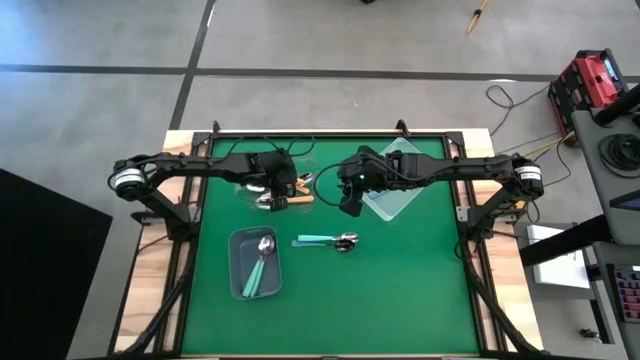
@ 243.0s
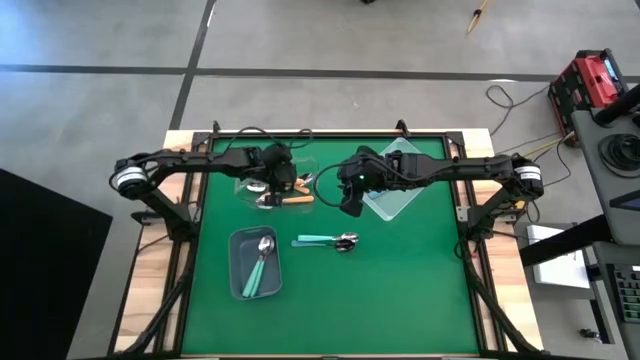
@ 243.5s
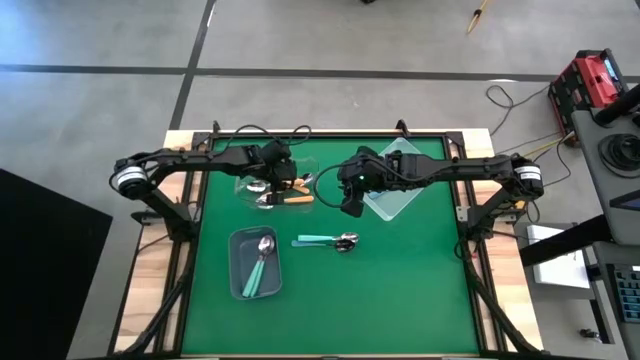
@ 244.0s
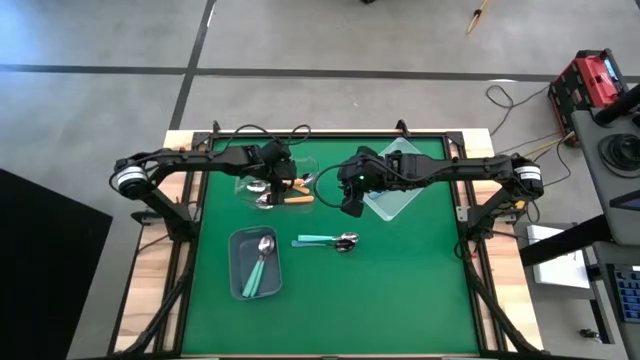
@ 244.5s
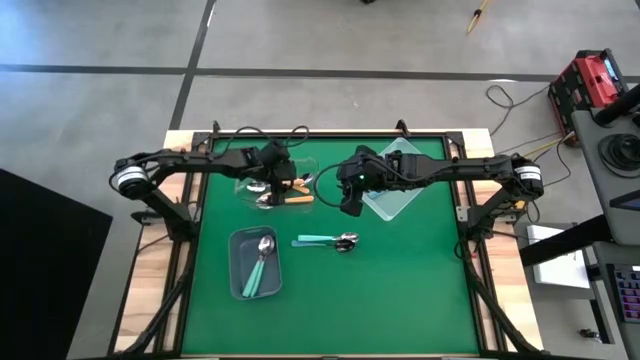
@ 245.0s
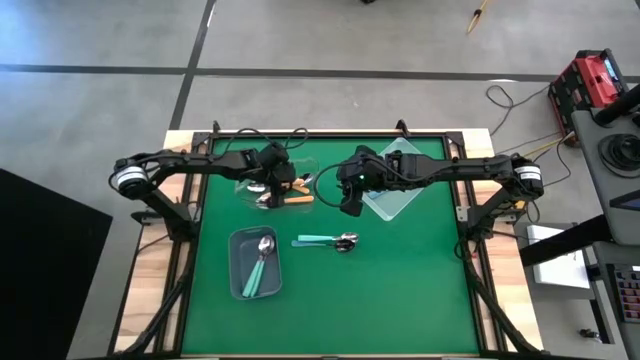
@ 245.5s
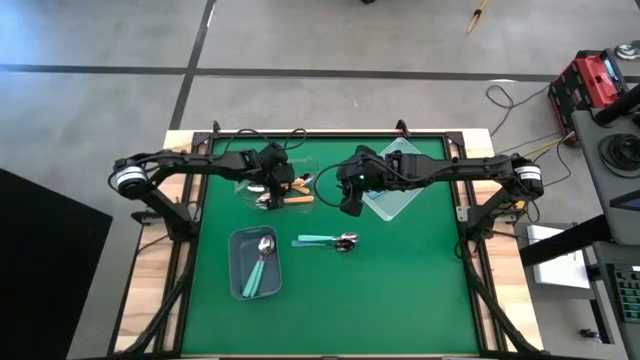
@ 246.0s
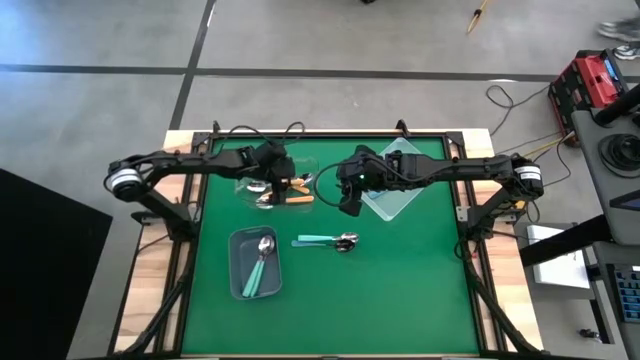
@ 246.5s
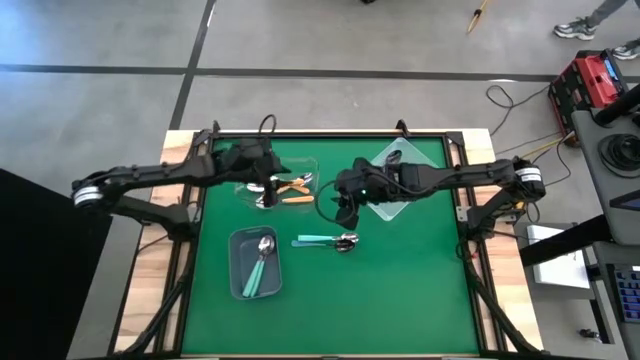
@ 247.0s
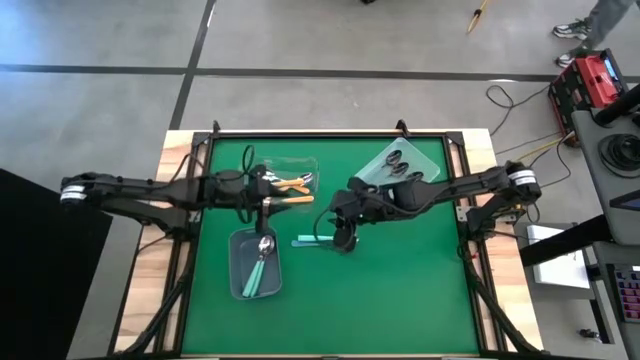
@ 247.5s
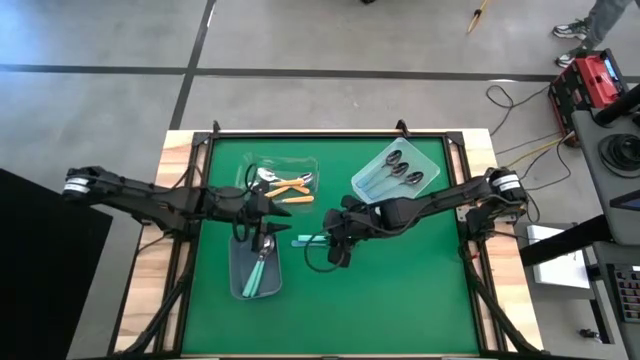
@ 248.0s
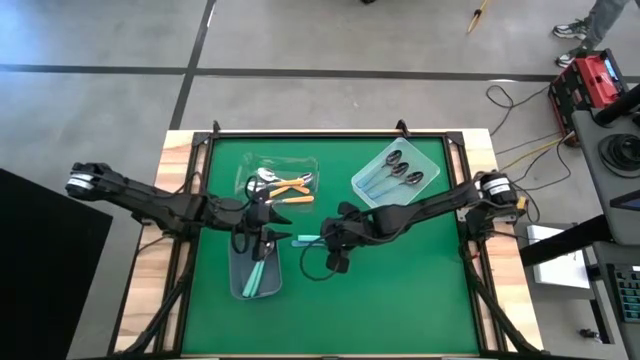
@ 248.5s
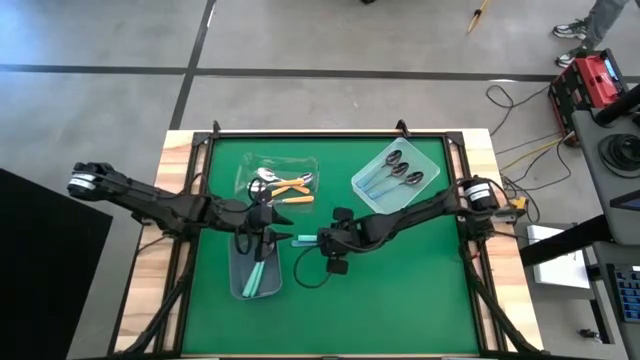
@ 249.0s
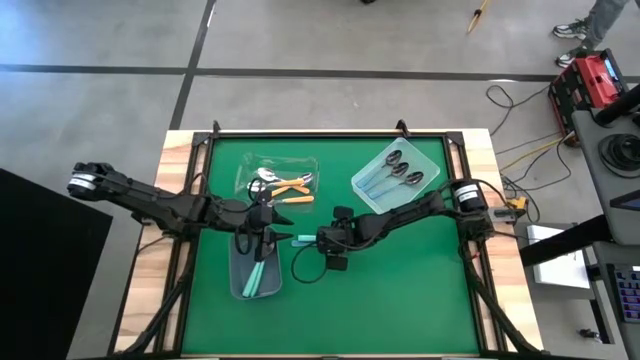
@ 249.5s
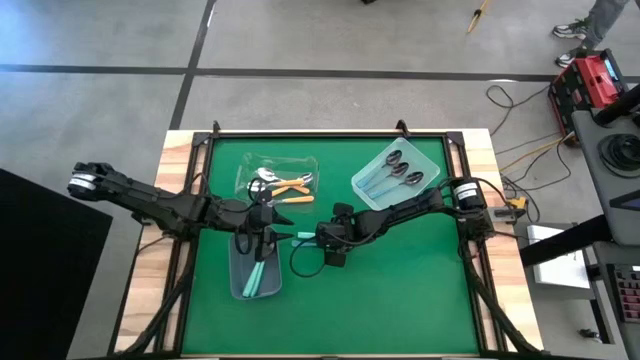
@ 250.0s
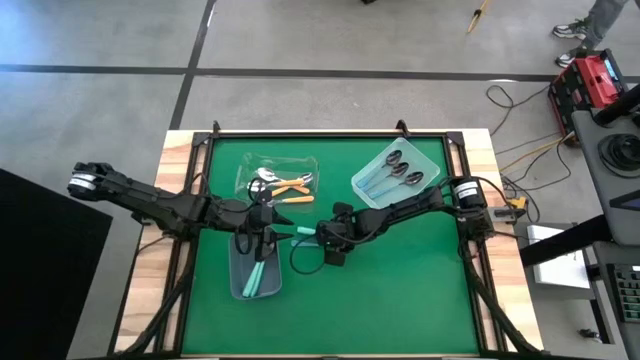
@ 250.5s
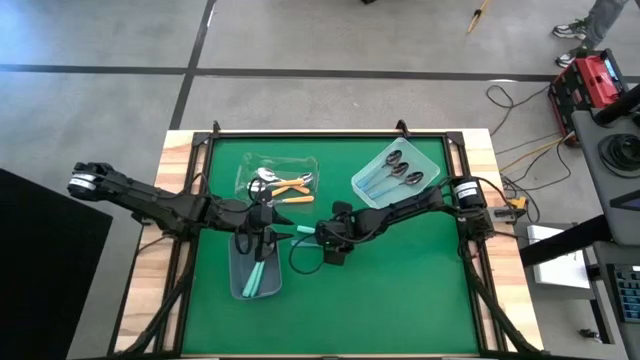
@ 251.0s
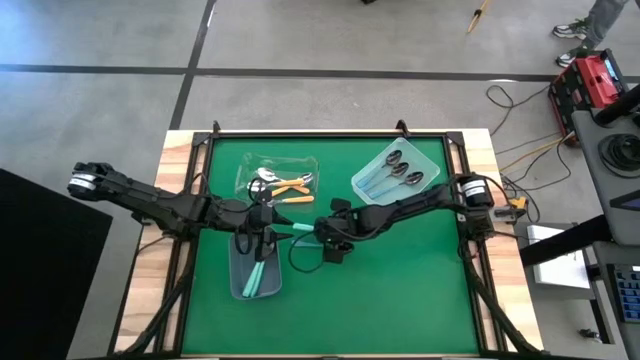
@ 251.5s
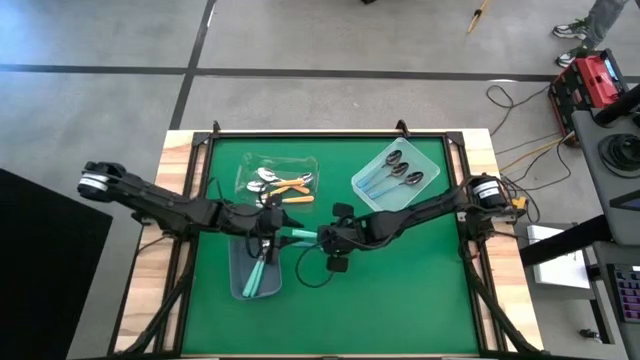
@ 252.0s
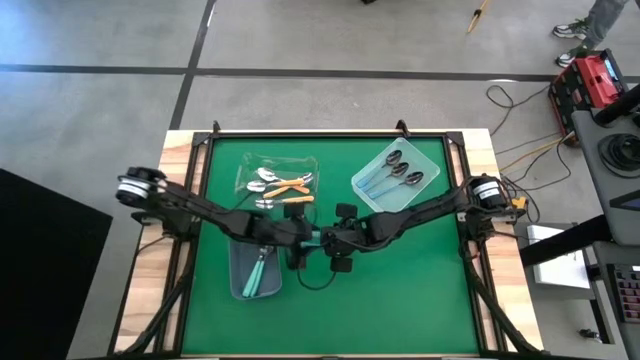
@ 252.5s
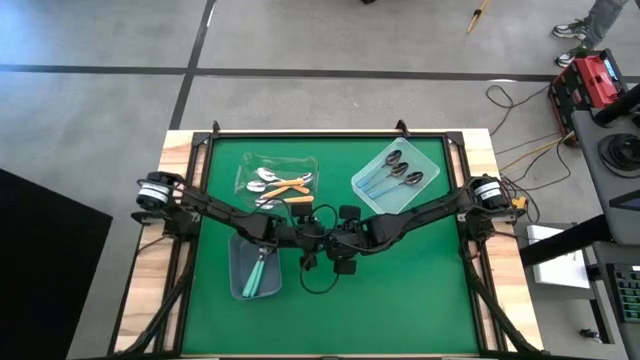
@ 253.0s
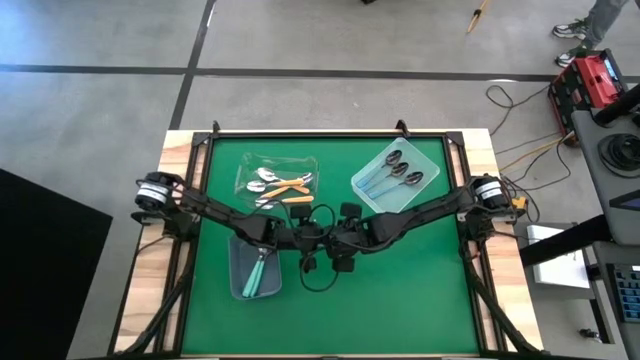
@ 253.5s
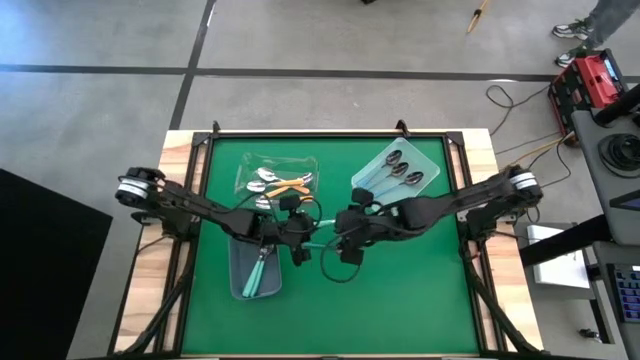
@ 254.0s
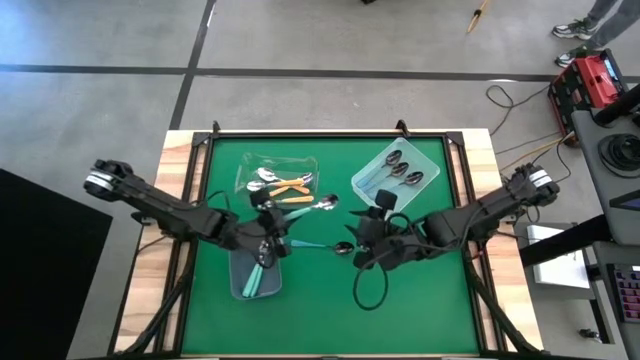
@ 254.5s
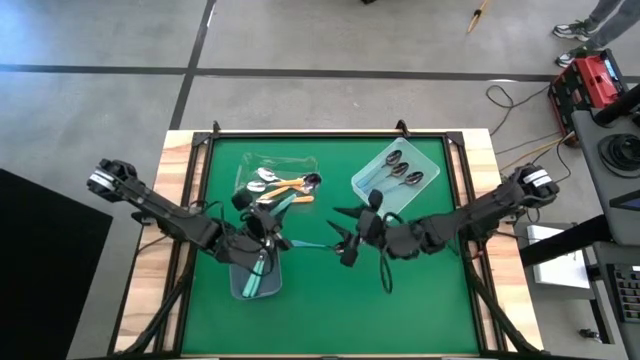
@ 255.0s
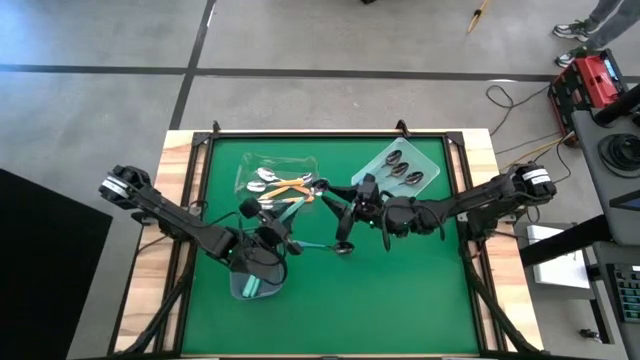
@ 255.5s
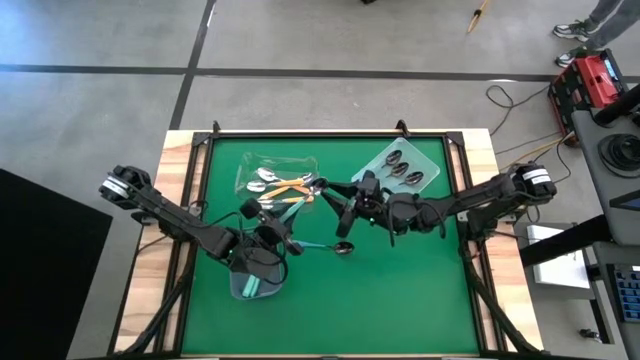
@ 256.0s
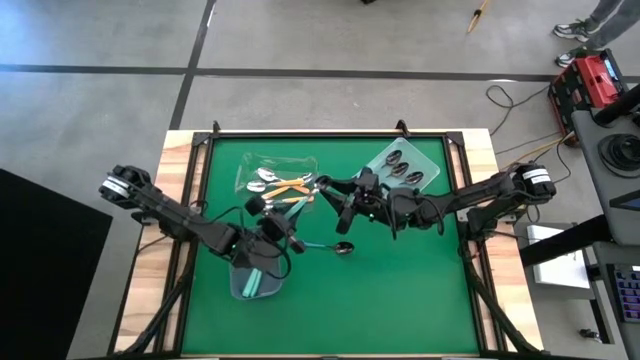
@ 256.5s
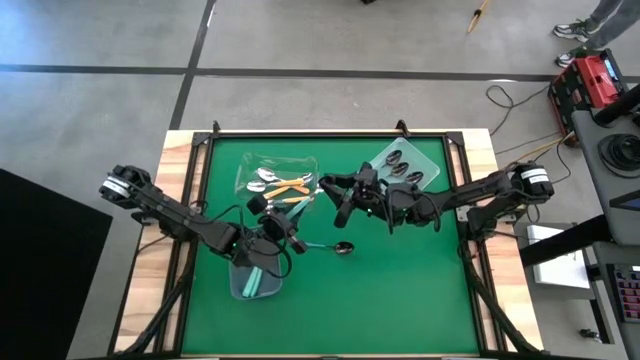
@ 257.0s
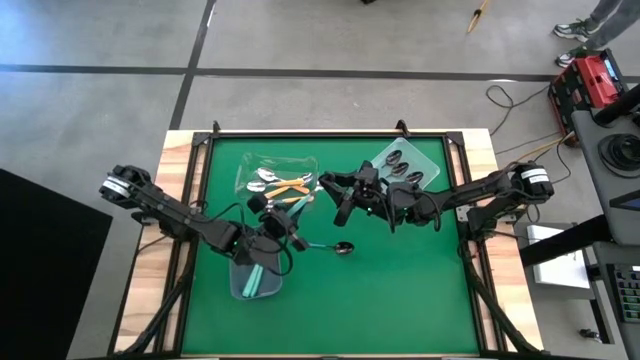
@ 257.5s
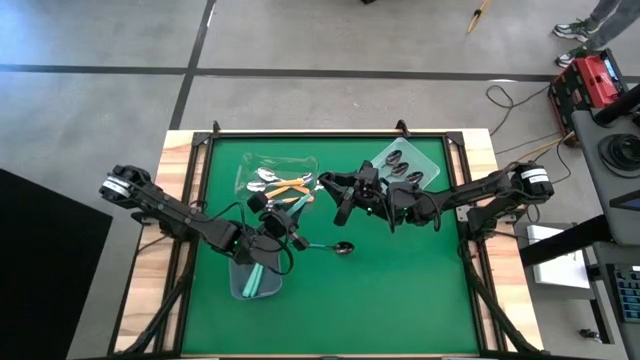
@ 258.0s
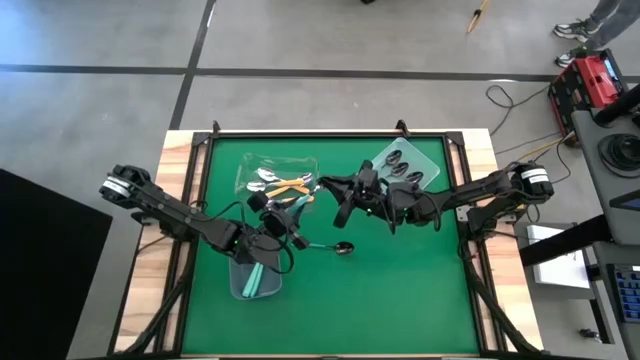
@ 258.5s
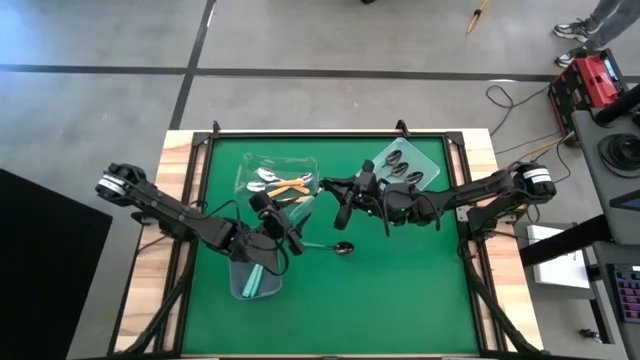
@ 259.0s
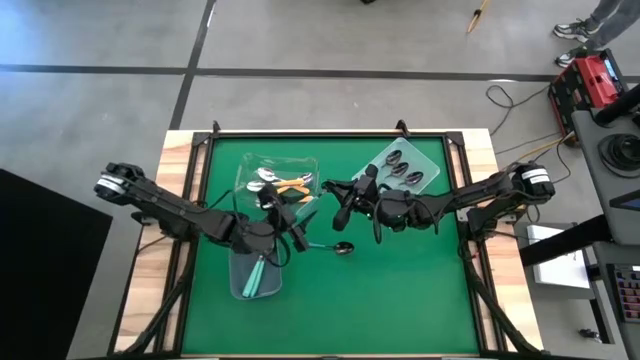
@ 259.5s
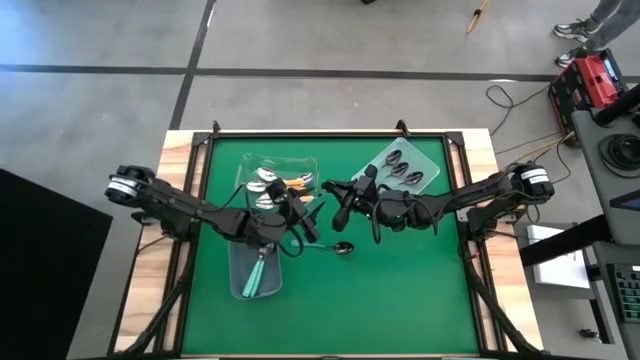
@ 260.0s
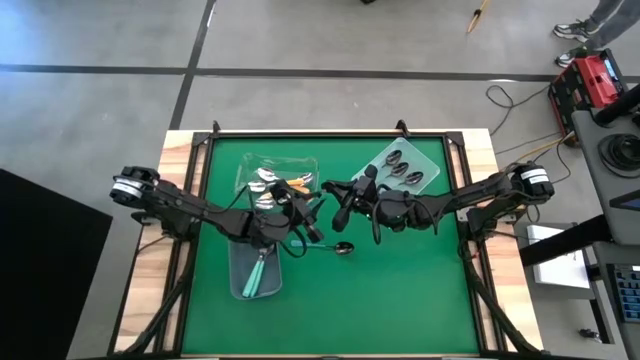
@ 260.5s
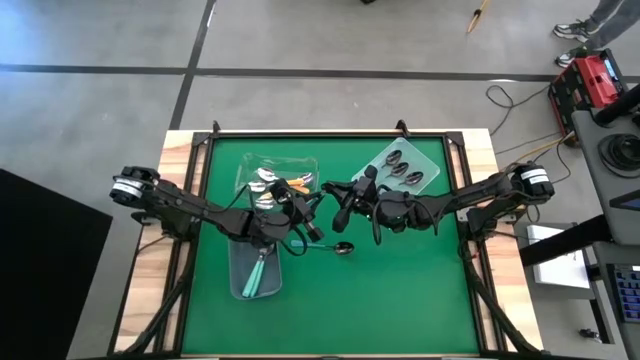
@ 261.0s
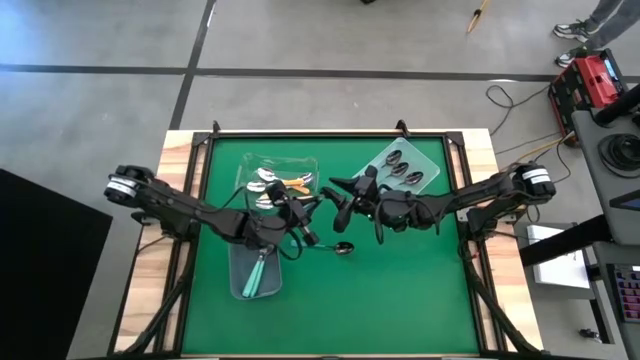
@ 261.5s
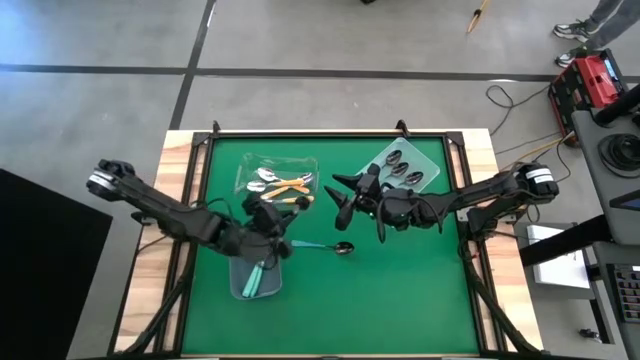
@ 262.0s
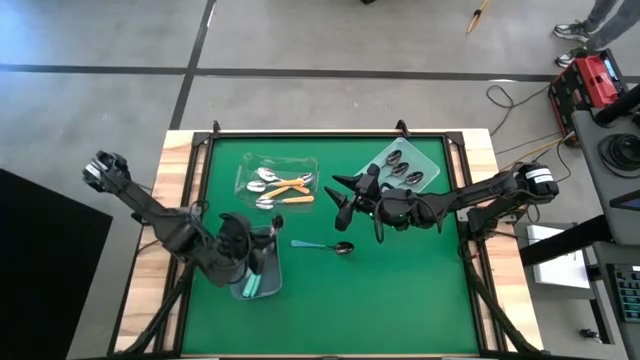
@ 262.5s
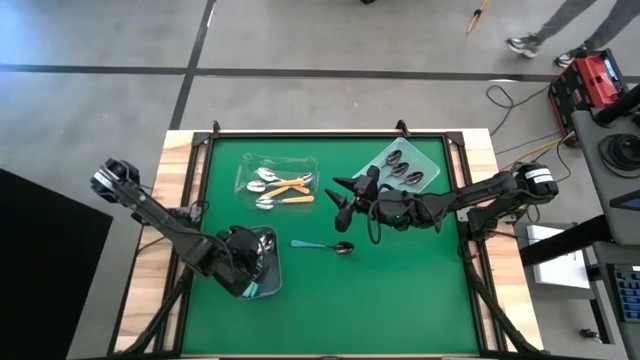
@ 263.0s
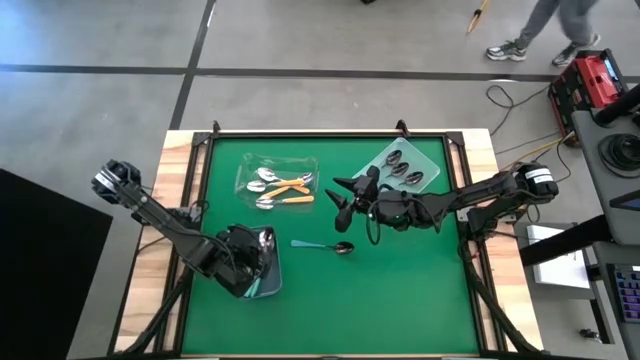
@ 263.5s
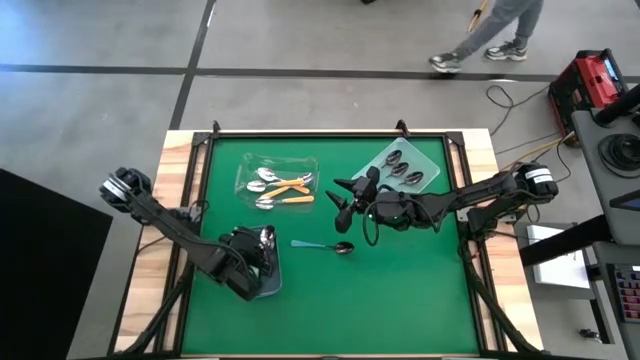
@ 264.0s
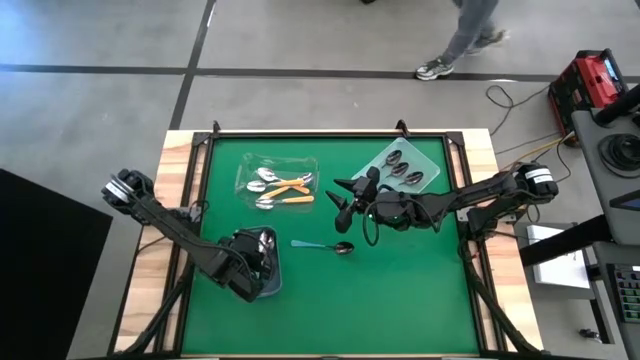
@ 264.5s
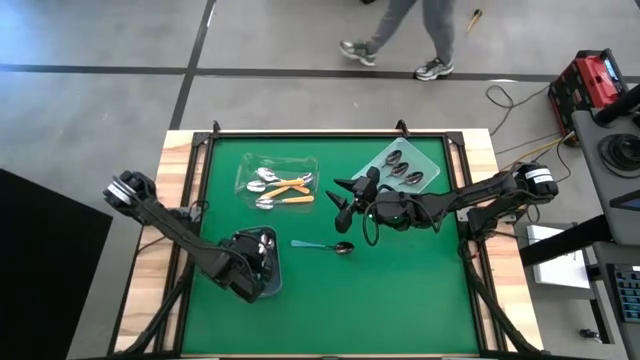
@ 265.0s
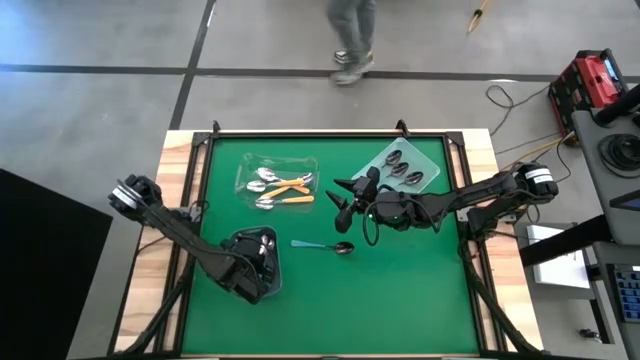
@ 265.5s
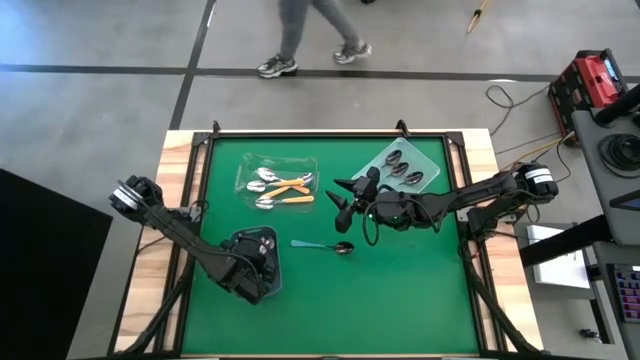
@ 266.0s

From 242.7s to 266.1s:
Task: Sort silverware by color (type)
Put the light blue spoon into the gray bin
